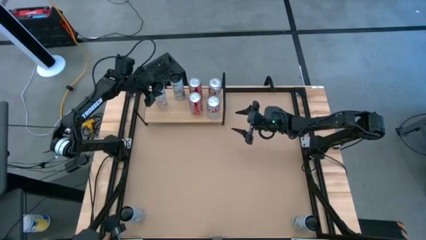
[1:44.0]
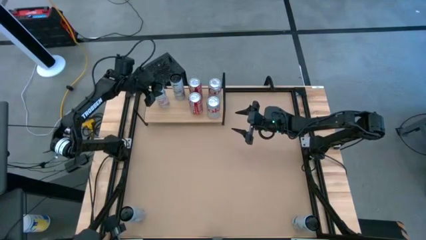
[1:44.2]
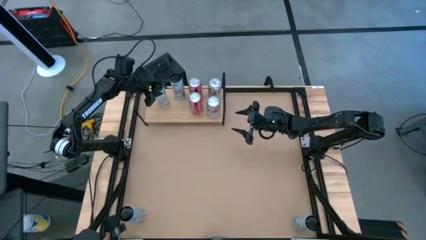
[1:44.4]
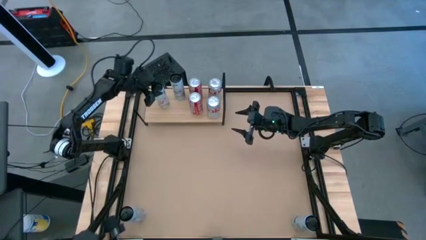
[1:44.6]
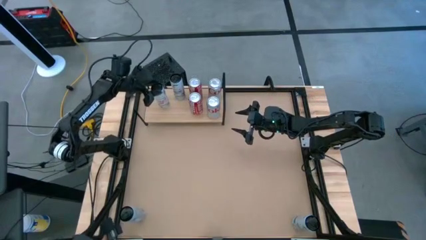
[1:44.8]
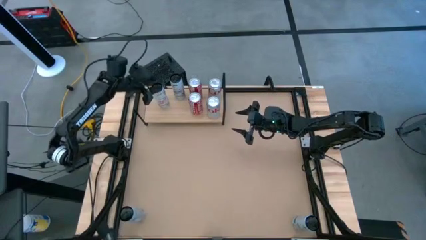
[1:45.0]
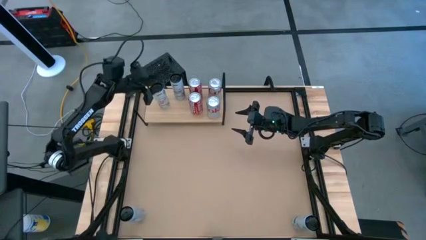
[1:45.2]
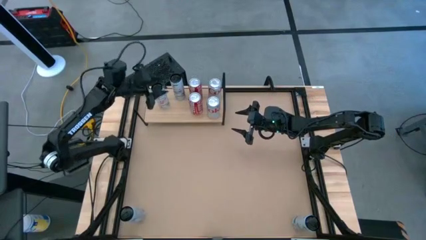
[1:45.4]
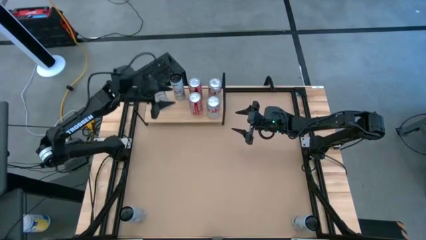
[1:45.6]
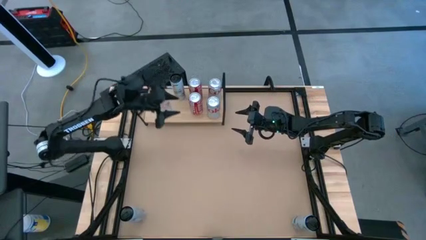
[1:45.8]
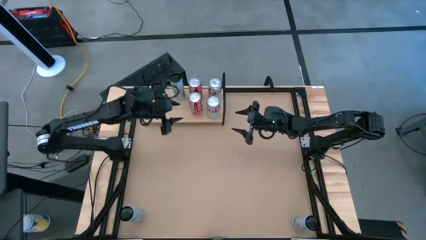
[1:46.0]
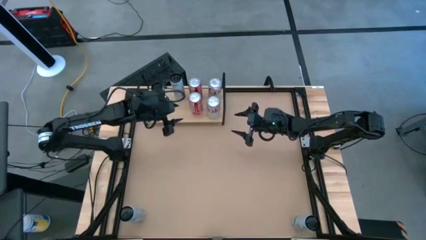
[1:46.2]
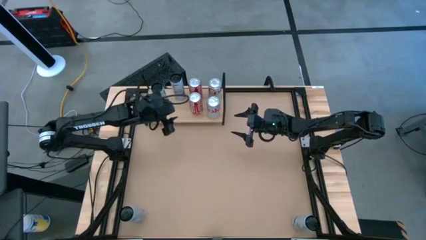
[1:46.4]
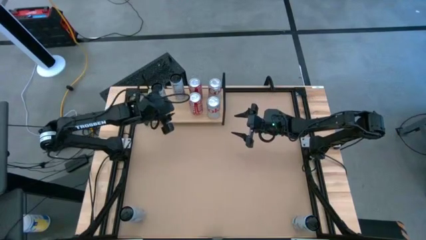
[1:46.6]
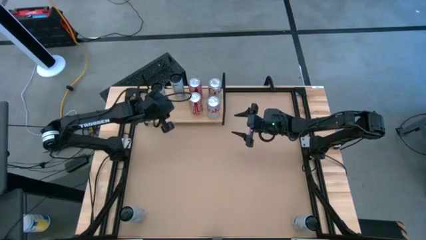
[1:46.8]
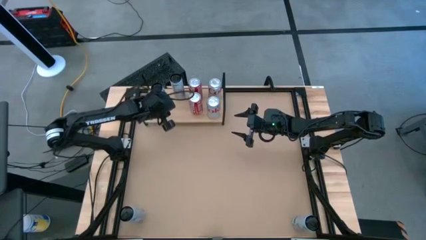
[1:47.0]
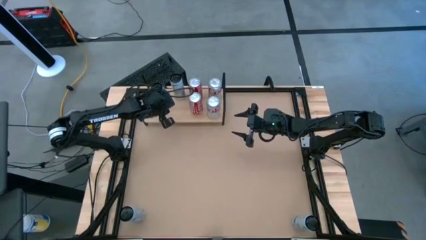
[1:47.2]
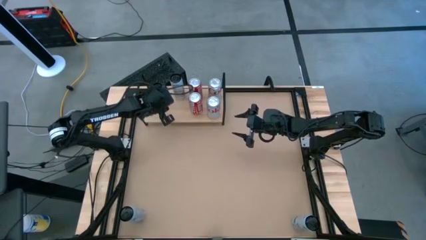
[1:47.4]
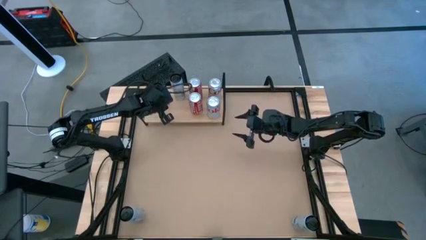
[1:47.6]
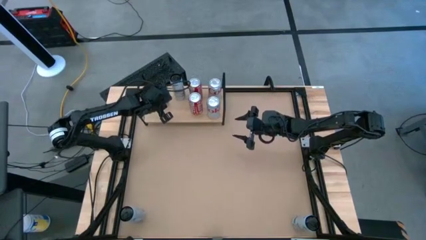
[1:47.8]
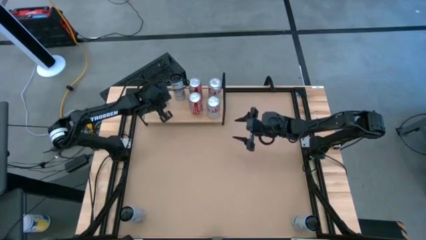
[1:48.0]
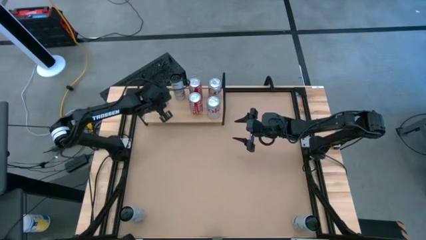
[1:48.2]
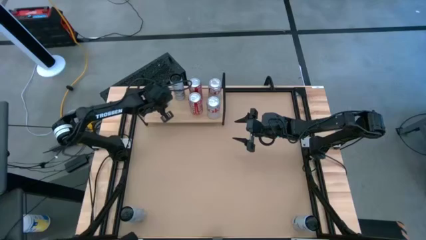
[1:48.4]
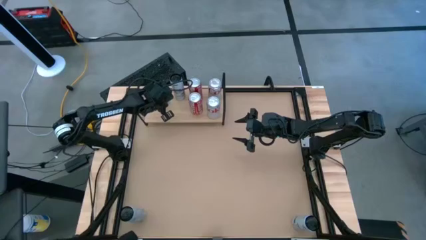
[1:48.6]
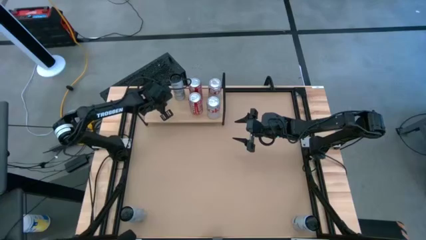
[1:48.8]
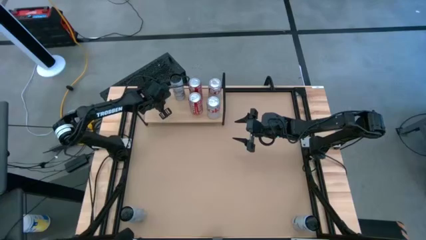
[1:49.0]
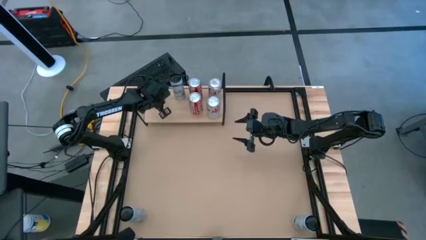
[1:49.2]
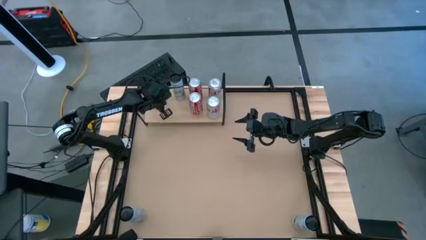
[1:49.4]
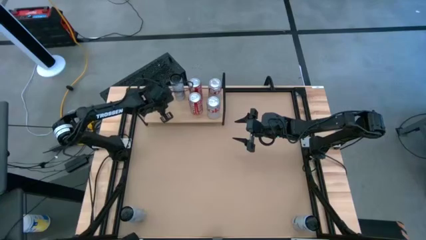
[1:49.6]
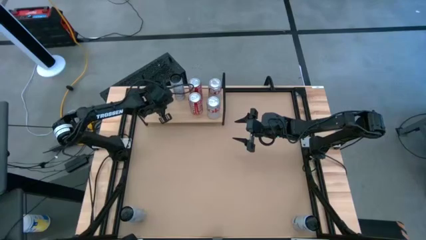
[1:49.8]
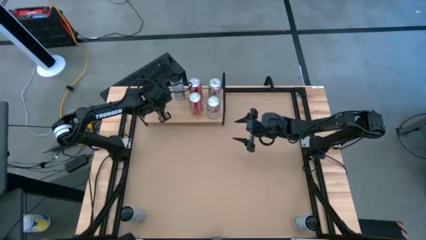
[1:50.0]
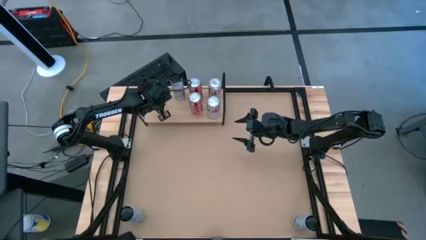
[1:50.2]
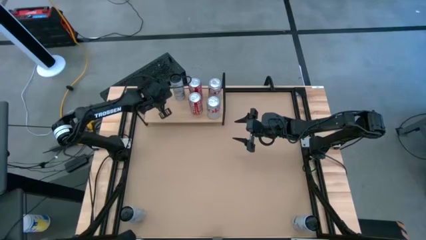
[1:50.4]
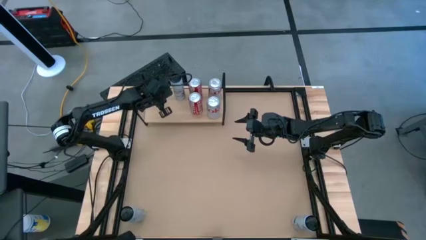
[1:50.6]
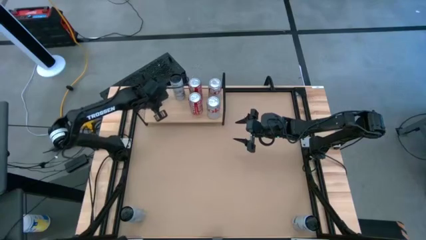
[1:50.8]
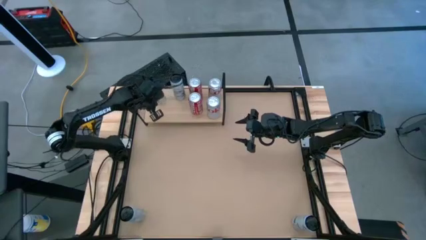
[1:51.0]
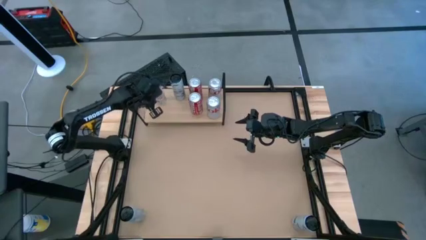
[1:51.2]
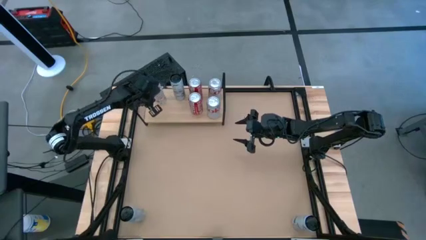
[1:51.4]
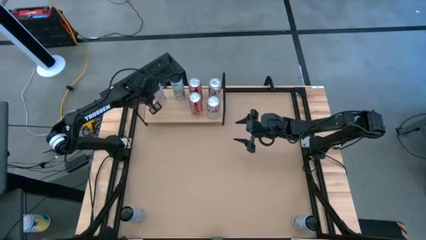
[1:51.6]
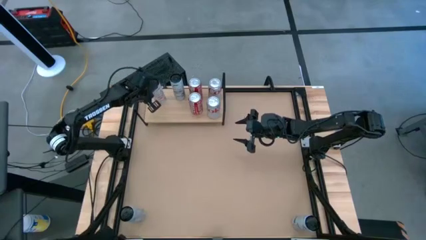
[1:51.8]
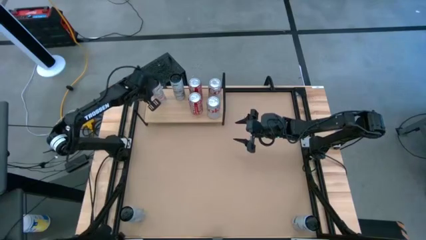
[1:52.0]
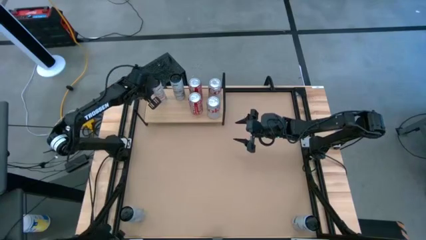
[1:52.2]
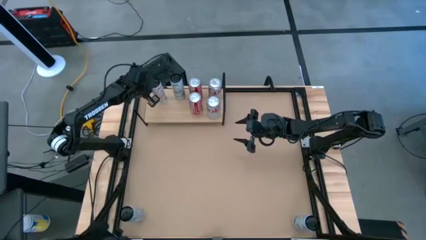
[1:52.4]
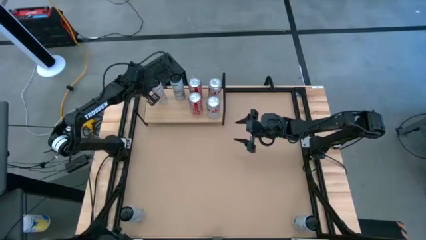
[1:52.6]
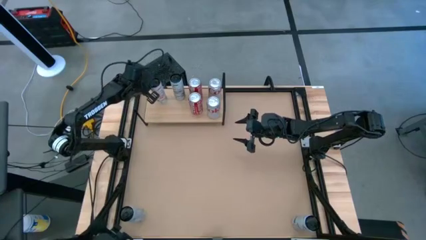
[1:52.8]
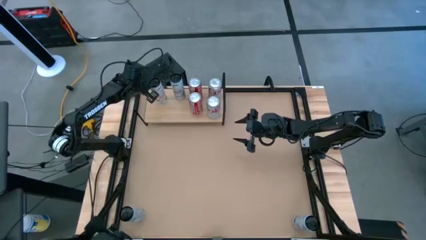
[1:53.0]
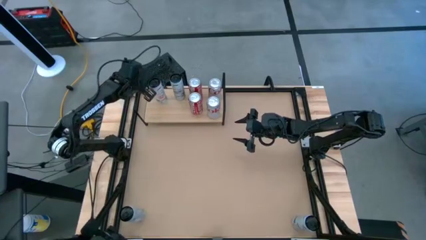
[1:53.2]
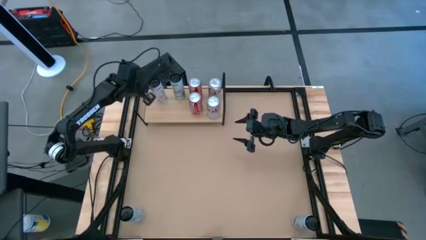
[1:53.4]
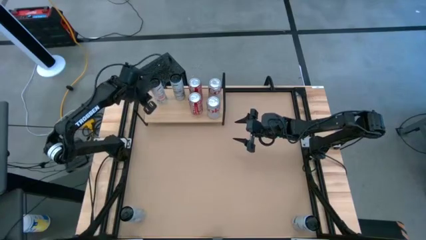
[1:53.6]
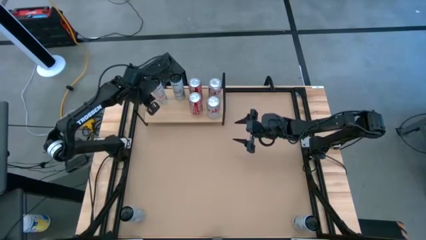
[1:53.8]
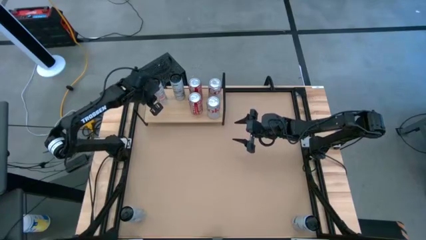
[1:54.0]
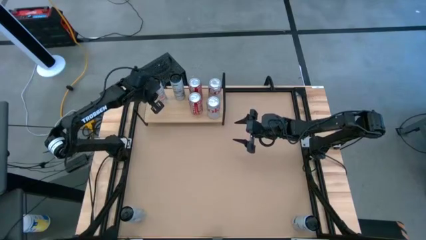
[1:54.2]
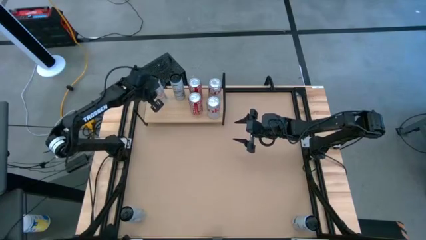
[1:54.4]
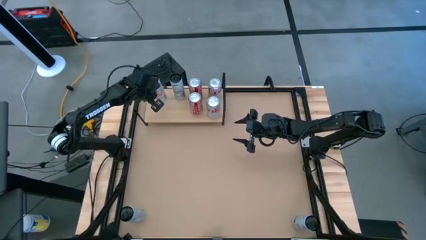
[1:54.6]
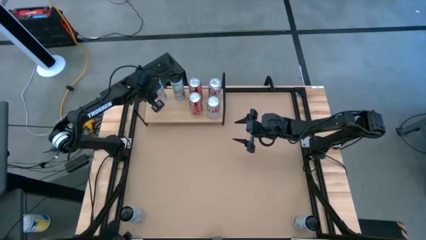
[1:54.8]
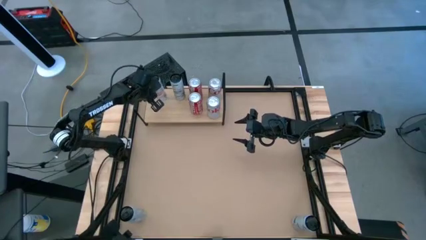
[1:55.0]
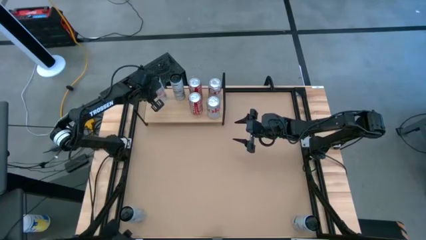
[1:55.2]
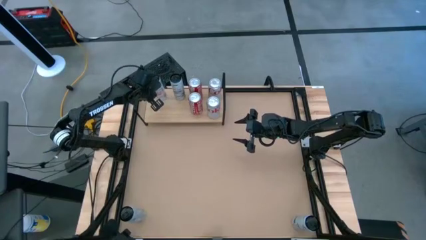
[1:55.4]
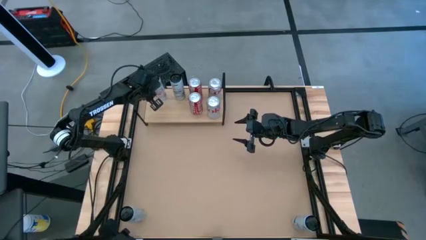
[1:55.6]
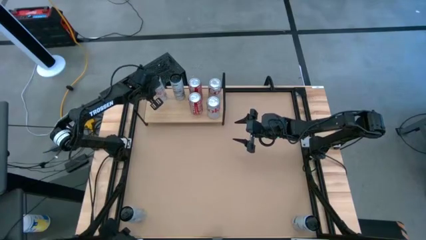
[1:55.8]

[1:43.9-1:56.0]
Task: Place canned beverage on shelf
Put the top white and pink soda can on the shelf

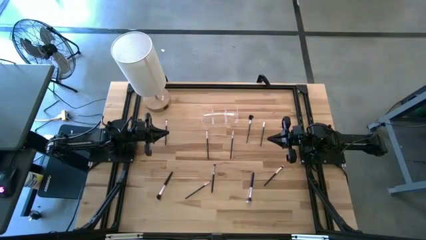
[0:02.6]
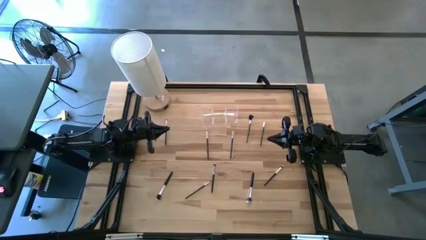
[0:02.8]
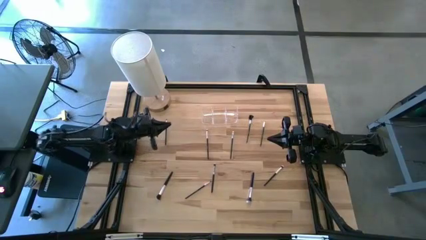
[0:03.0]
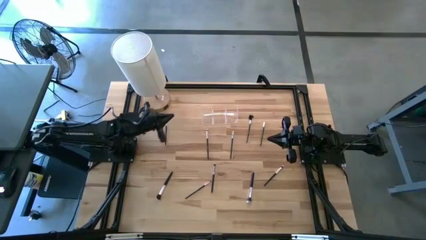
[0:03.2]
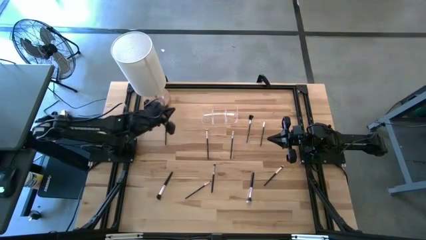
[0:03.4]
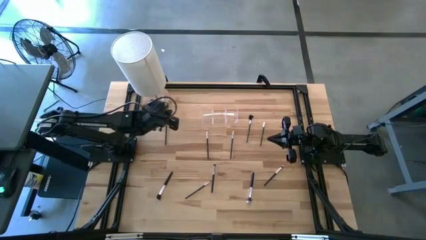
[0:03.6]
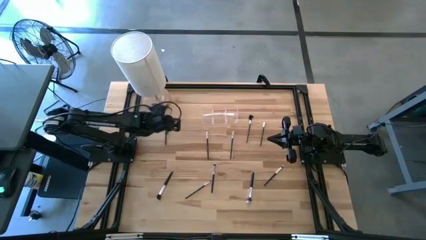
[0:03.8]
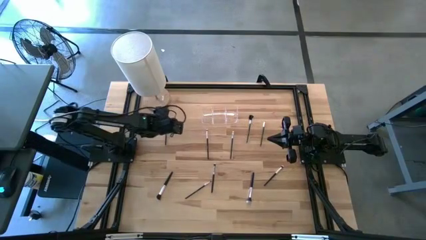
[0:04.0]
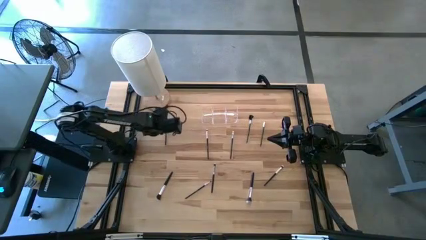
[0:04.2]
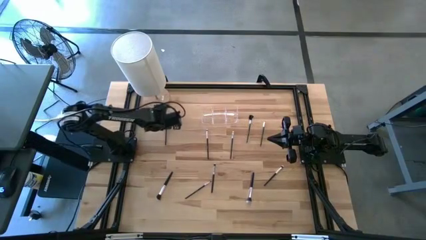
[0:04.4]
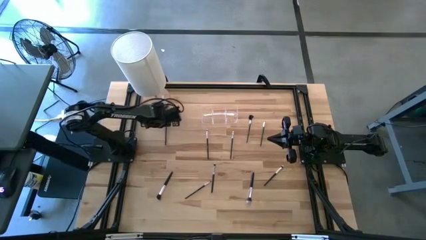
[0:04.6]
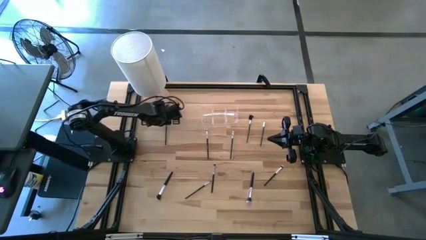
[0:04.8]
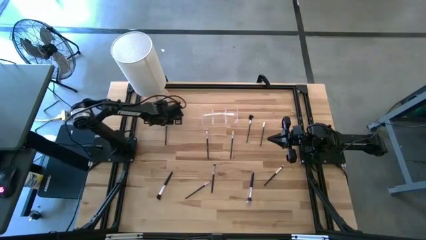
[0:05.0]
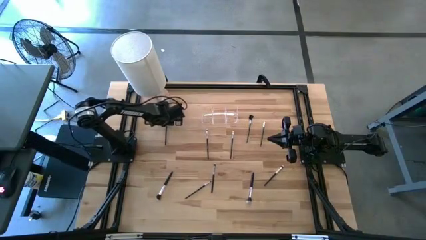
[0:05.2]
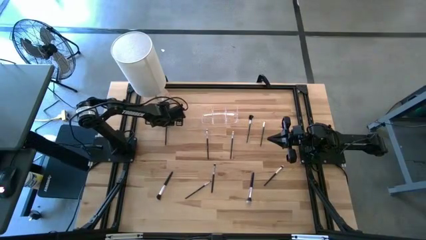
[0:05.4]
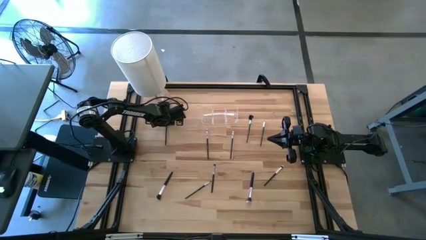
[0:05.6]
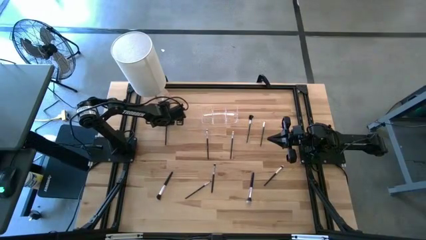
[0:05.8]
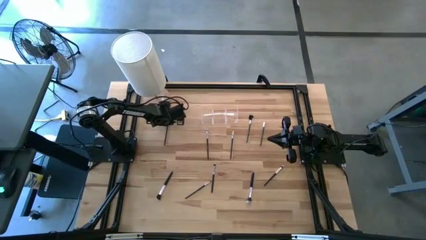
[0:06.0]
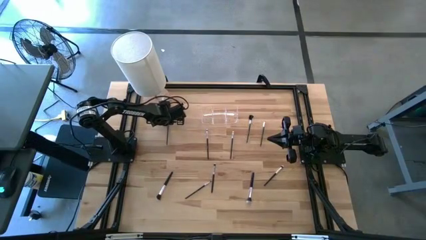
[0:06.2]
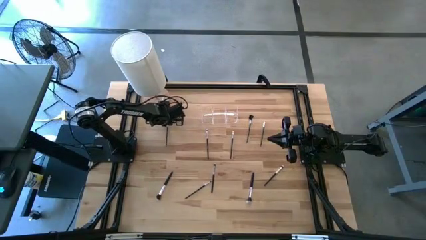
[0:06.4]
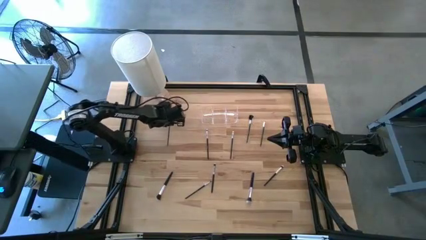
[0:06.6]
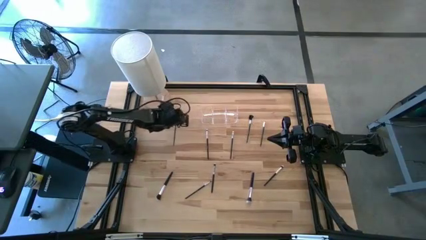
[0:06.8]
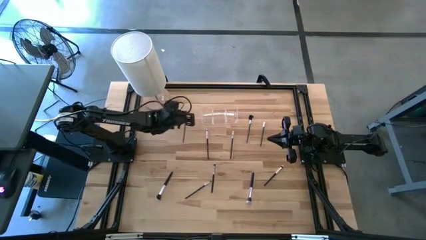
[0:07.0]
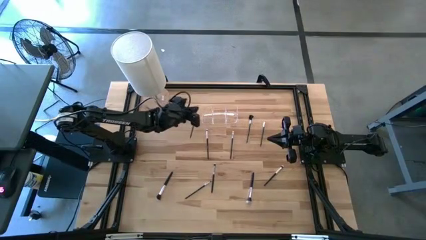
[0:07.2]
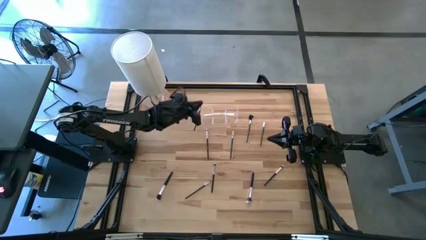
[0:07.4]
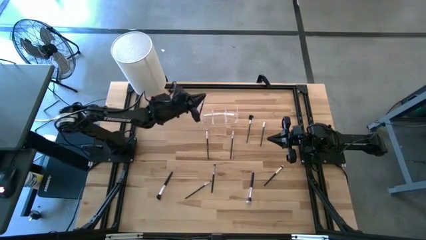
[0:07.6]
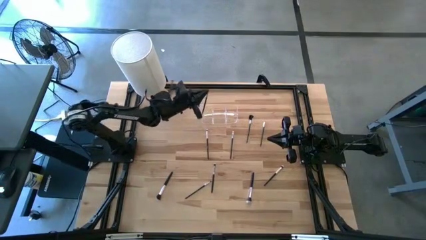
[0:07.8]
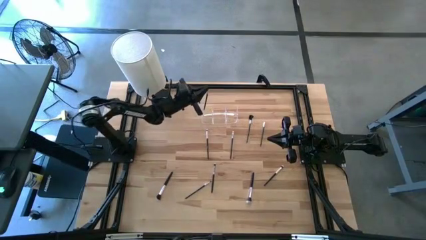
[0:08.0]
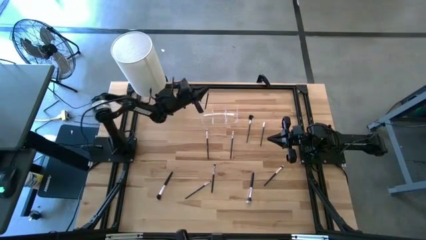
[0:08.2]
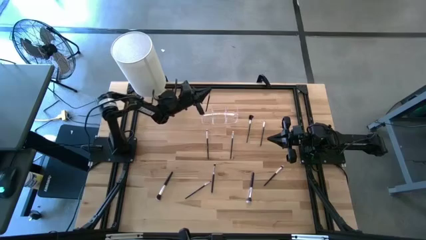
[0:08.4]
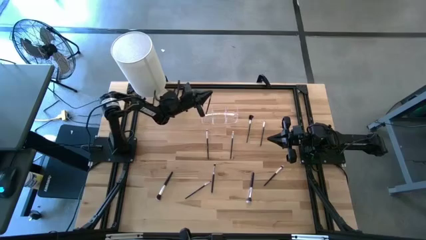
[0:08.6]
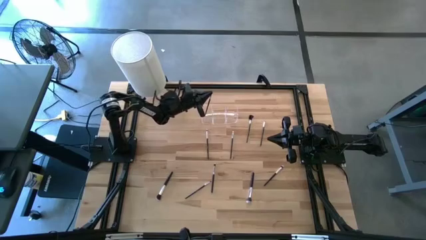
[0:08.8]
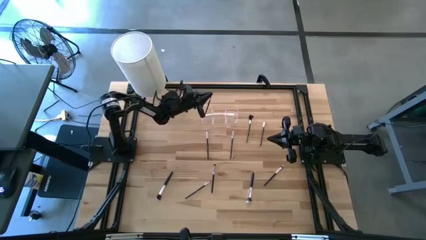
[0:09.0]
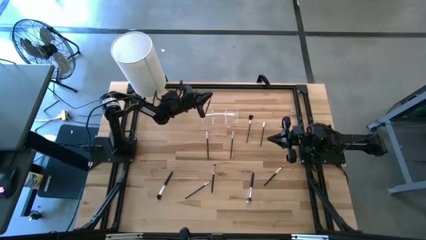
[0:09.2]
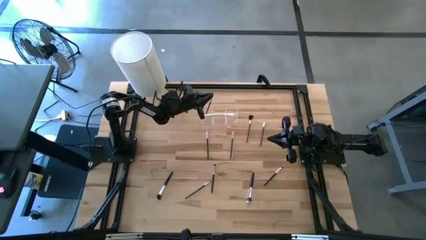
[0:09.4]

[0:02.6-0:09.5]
Task: Put items in baskets/containers
Put the left black liner brush into the transparent organizer
